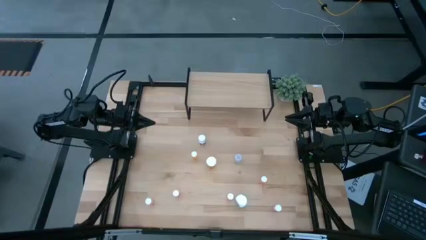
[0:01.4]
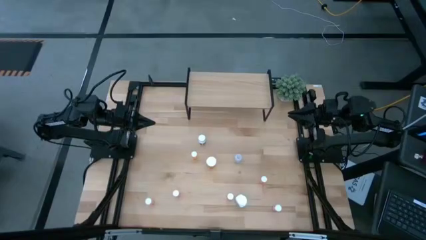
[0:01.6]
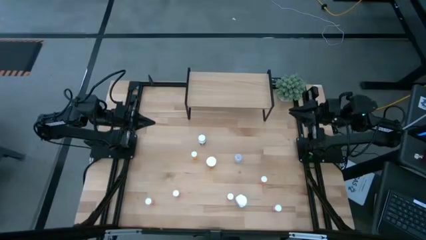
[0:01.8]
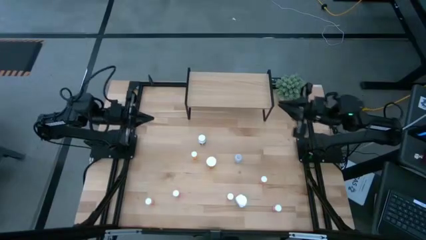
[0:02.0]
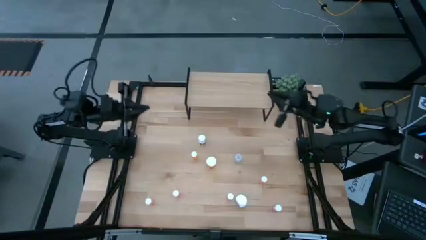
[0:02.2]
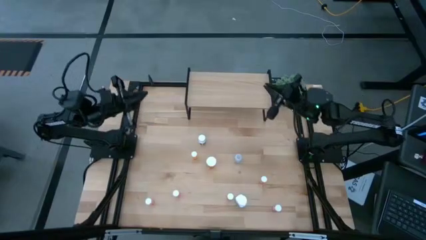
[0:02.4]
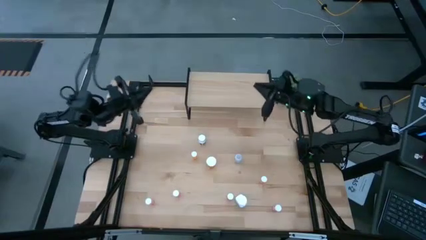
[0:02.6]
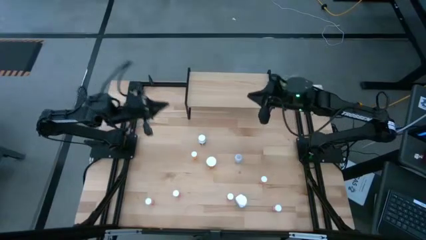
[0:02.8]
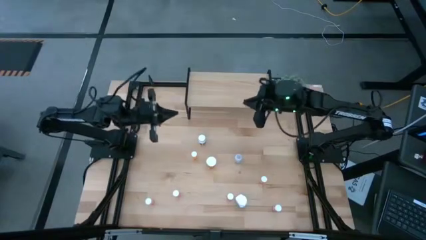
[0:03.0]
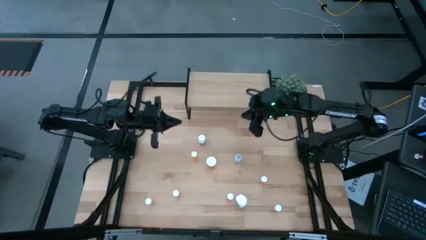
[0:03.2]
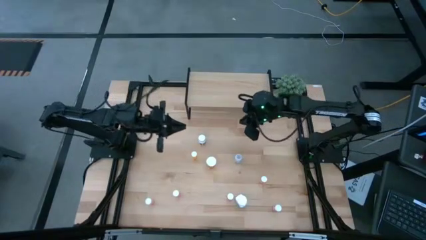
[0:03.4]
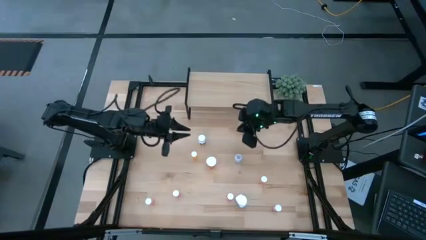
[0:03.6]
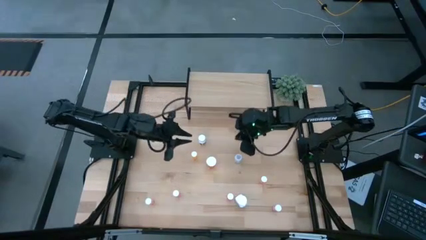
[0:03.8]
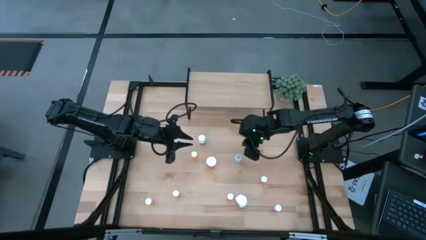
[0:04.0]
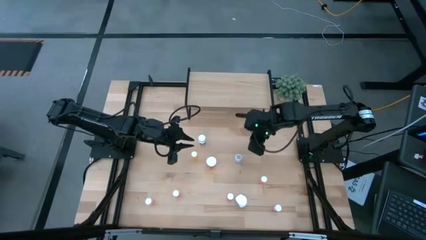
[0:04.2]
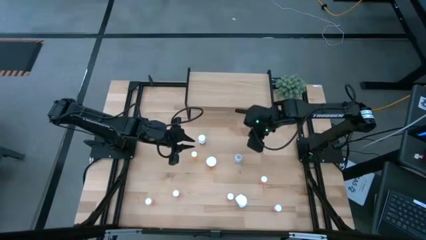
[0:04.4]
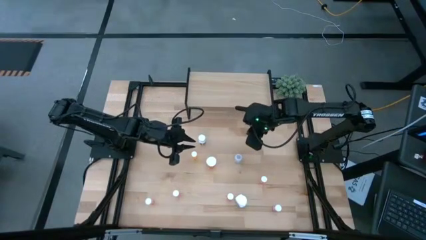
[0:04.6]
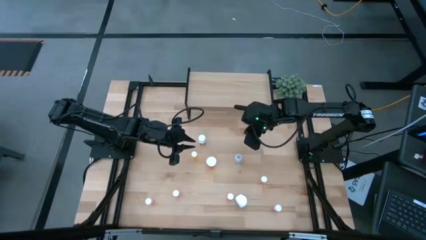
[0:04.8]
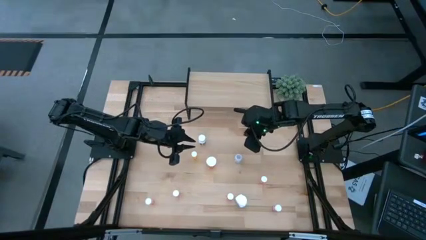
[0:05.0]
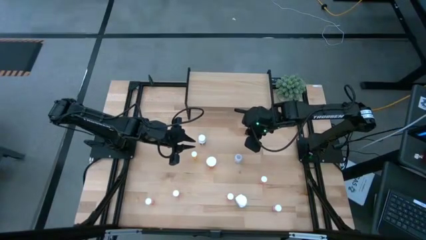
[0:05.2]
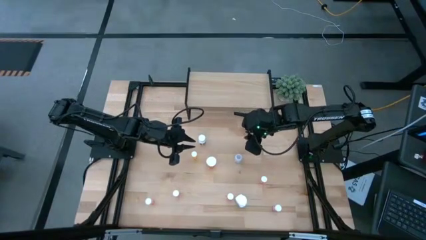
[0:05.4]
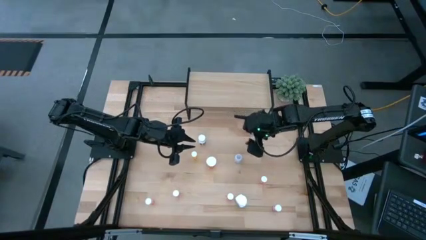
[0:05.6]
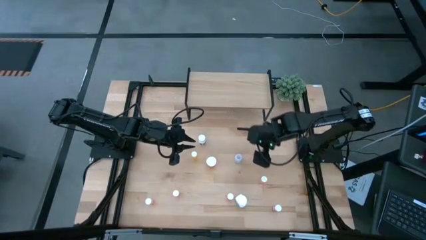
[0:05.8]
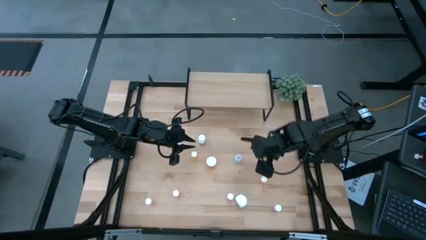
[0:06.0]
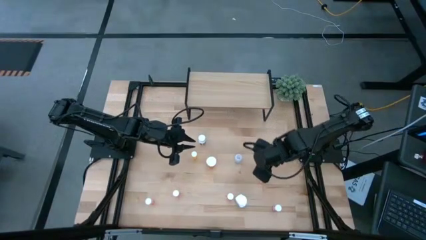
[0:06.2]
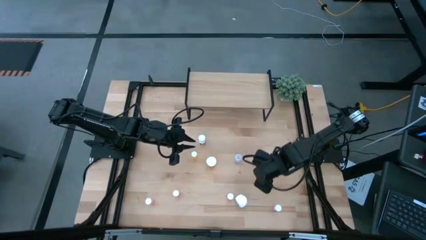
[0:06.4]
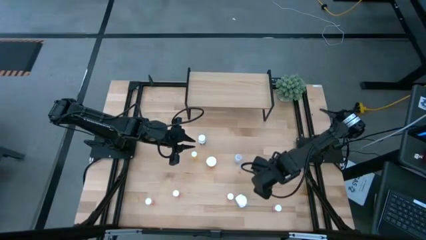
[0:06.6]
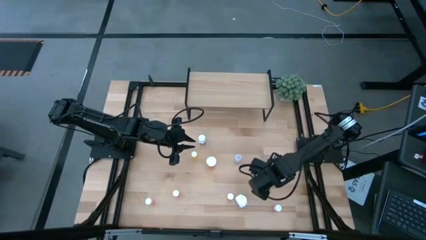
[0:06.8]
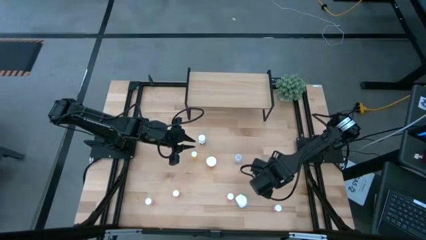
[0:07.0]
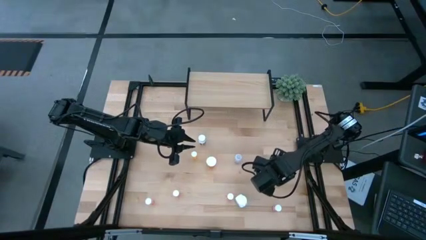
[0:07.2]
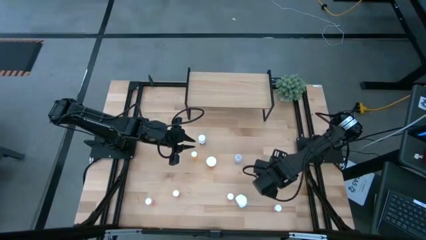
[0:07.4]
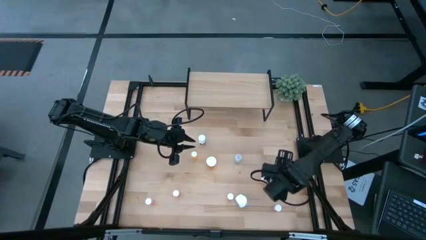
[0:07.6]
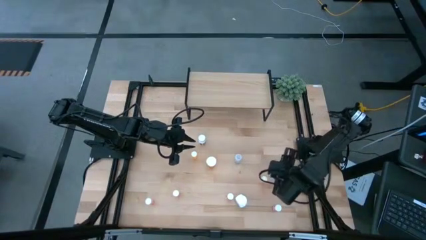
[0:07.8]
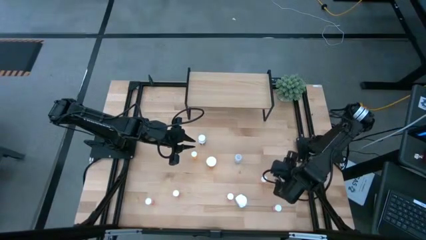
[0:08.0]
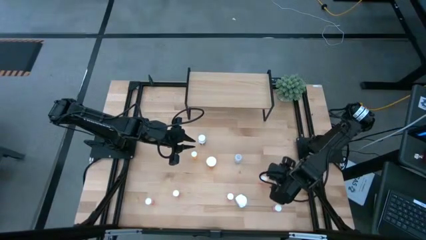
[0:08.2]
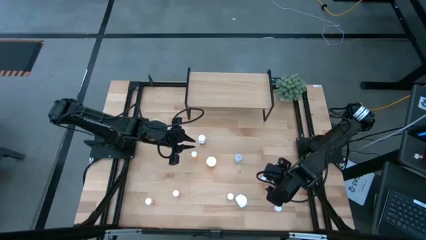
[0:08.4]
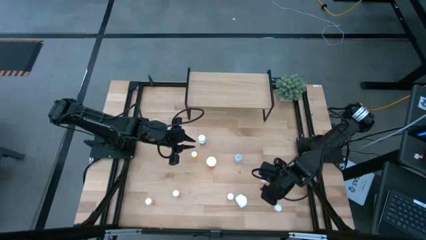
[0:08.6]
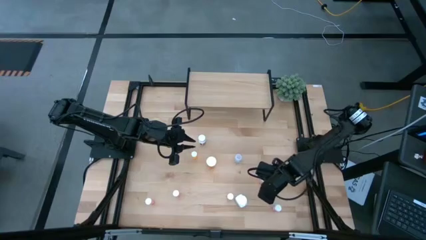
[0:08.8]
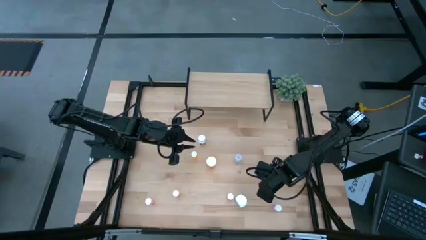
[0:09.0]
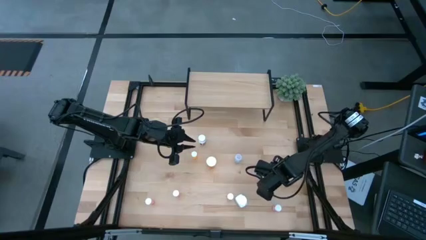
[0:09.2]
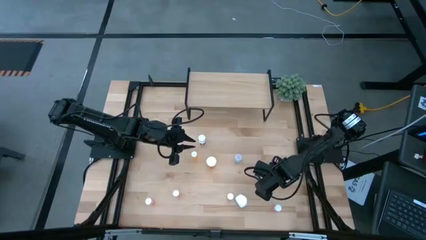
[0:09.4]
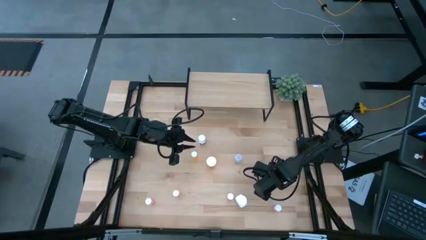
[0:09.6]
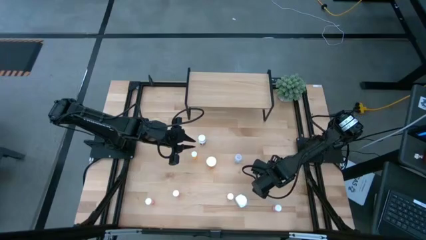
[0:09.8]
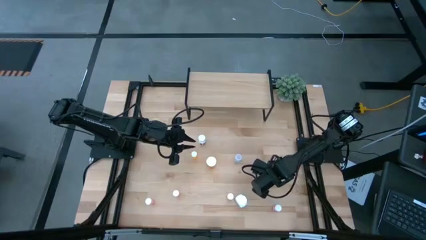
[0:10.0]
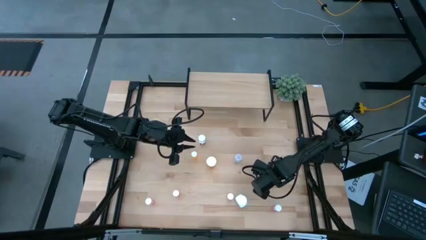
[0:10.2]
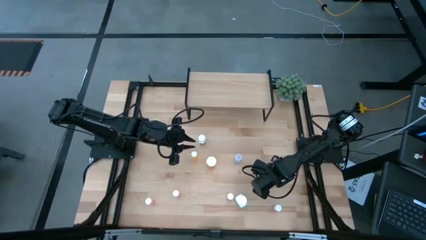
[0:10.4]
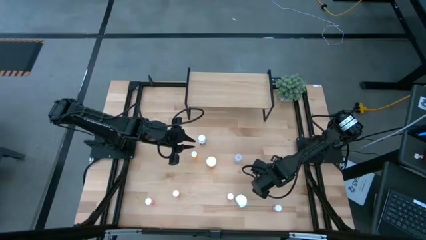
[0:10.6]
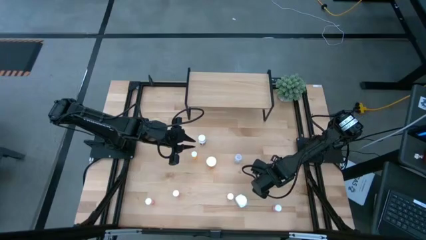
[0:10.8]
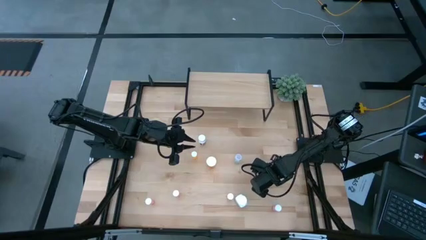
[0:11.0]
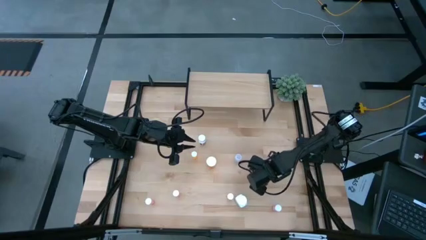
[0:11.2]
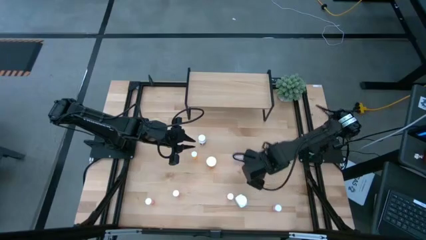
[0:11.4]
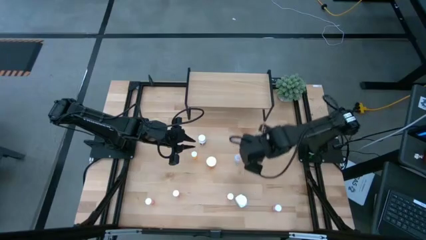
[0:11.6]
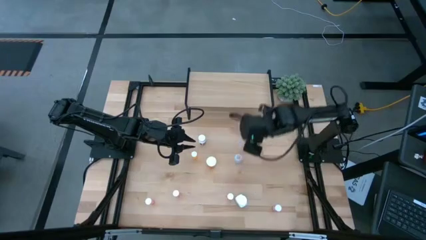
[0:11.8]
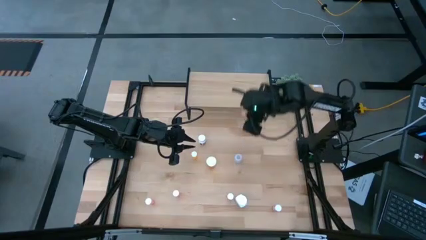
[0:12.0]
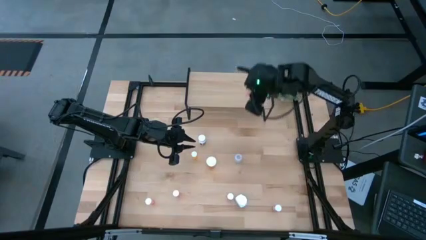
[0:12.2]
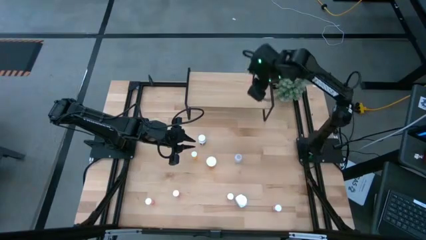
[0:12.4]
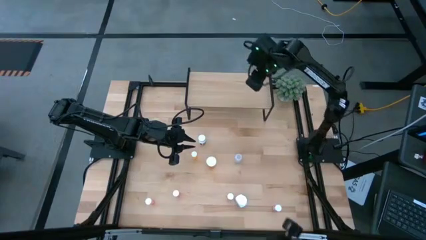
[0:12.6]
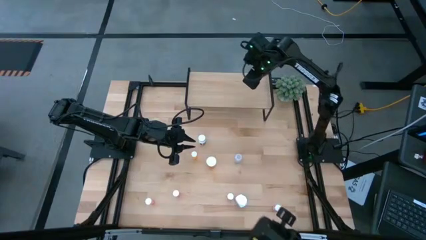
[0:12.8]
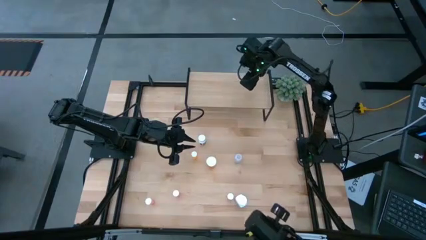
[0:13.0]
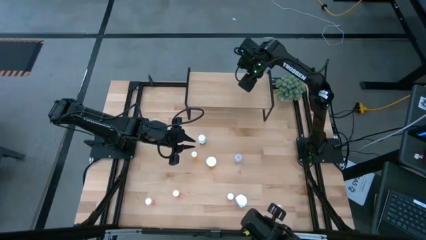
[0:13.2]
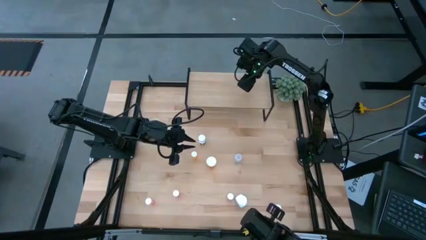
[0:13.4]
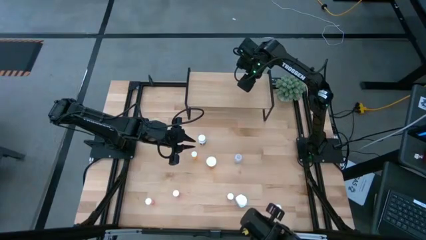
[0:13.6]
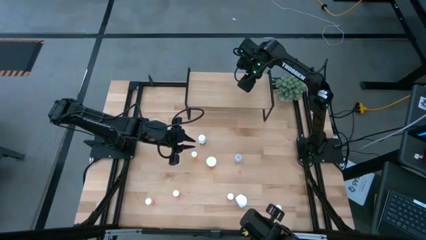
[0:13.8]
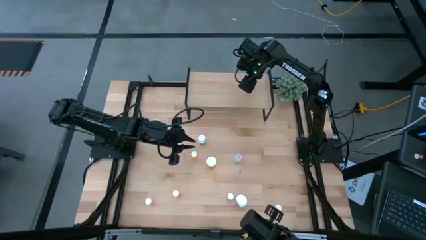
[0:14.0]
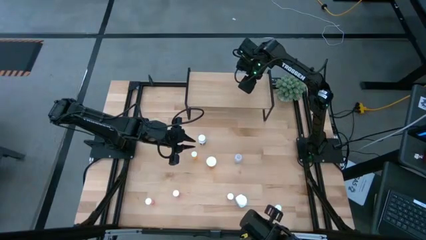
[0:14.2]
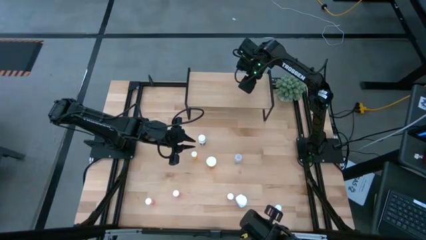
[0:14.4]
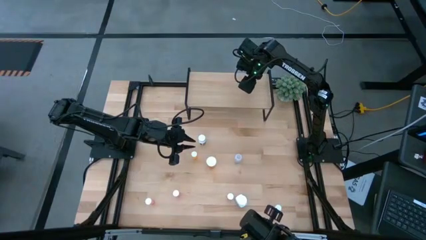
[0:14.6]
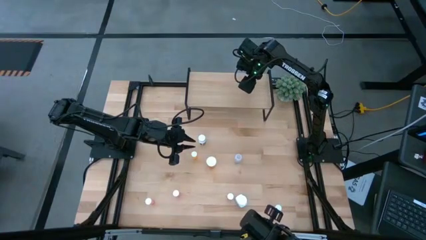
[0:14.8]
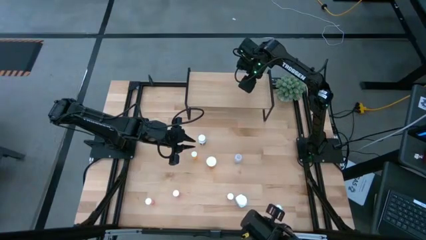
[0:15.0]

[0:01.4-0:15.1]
Task: Pick and place medicine bottles onto shelf by color
Put the top right pink pill bottle on the shelf
